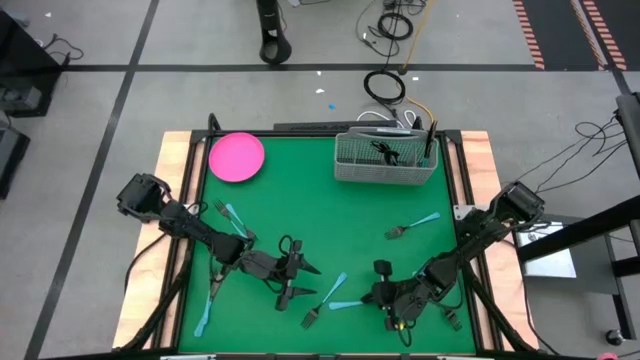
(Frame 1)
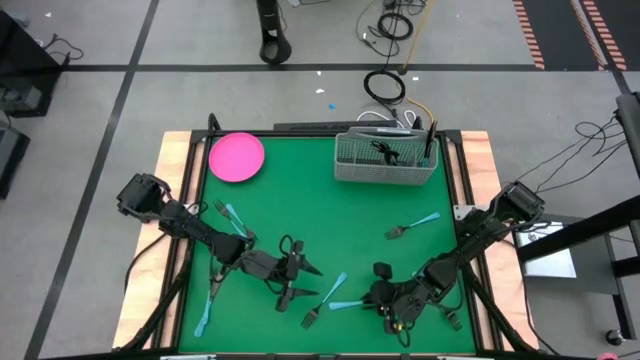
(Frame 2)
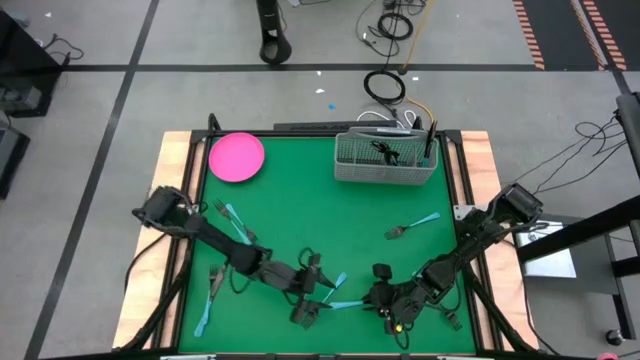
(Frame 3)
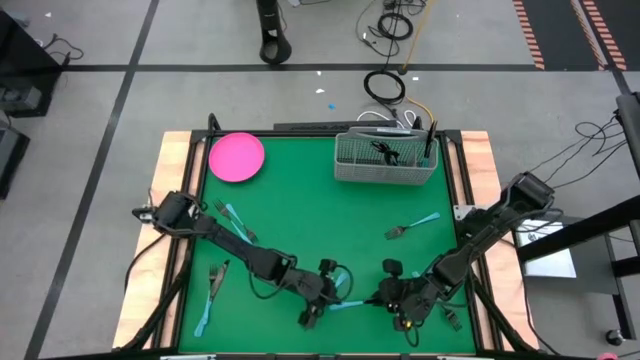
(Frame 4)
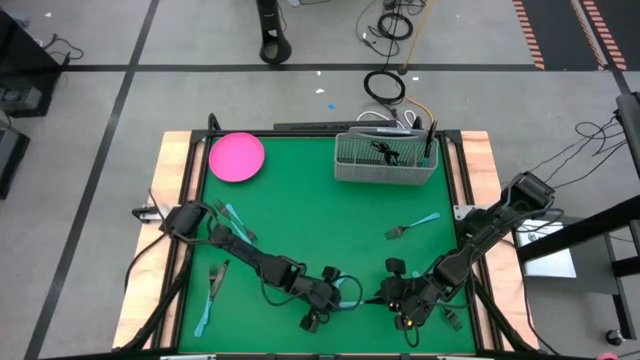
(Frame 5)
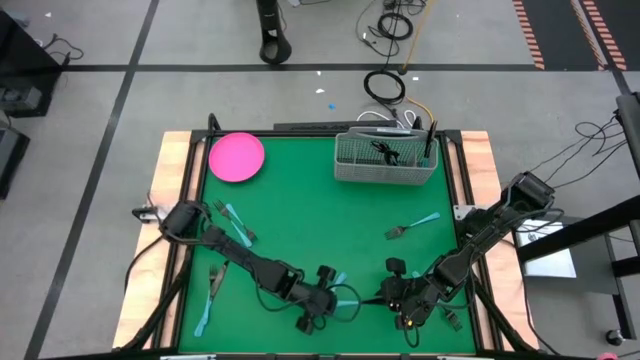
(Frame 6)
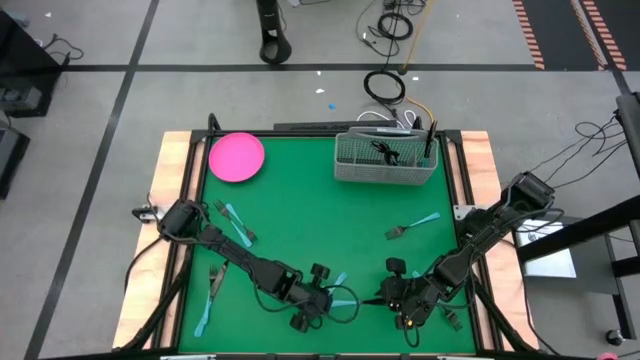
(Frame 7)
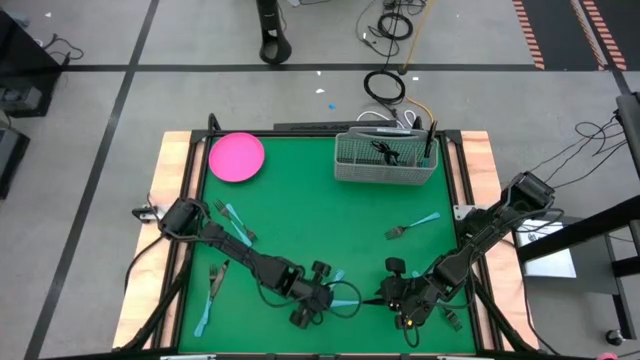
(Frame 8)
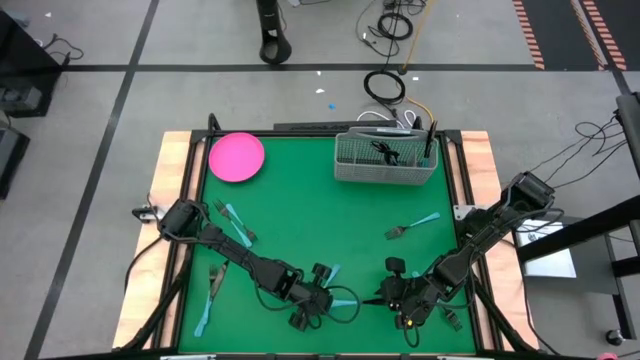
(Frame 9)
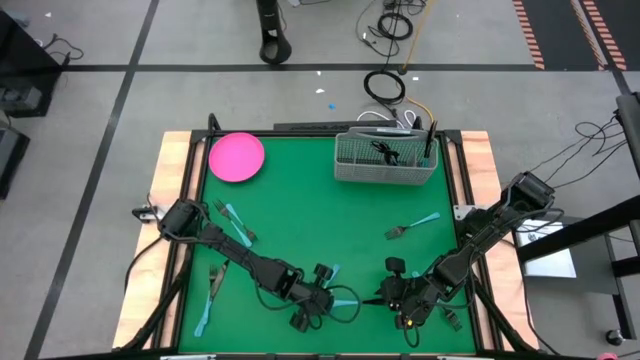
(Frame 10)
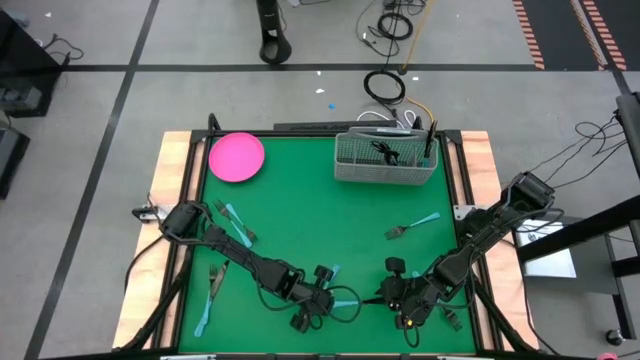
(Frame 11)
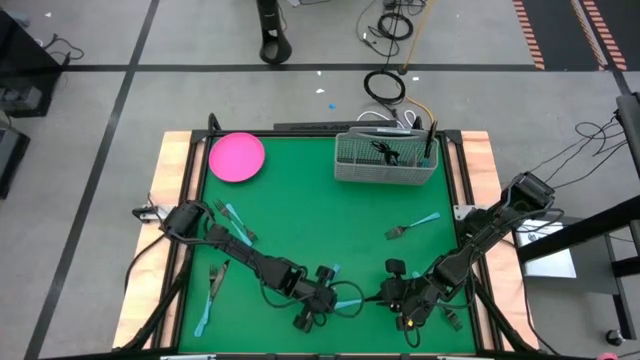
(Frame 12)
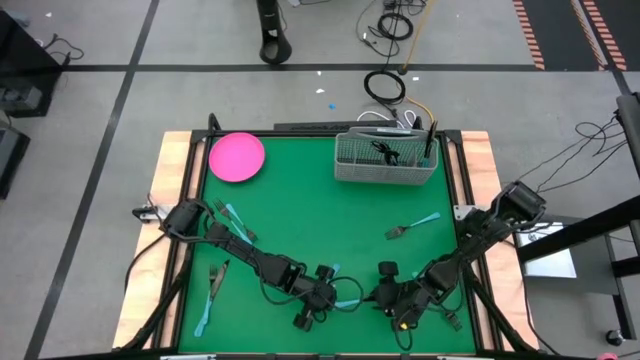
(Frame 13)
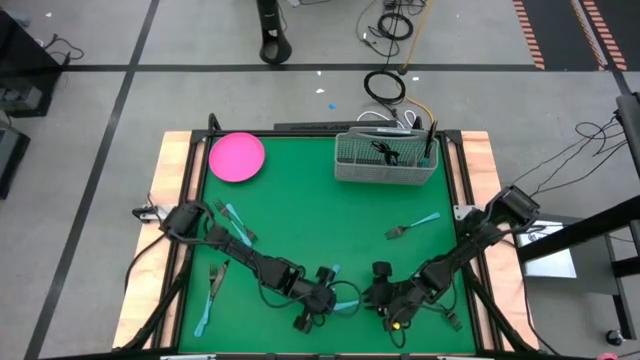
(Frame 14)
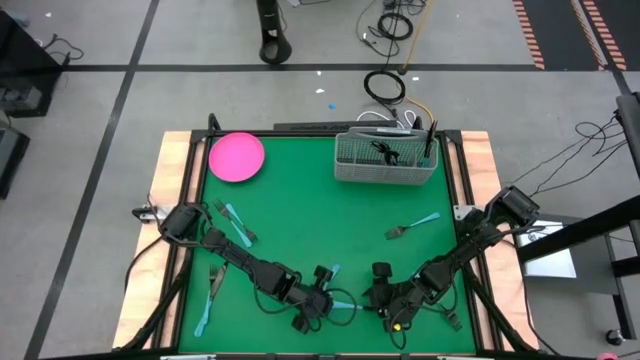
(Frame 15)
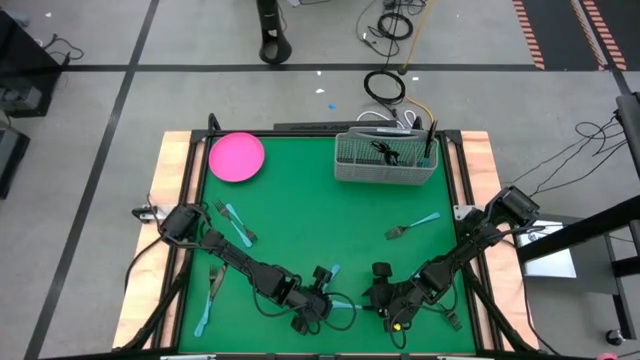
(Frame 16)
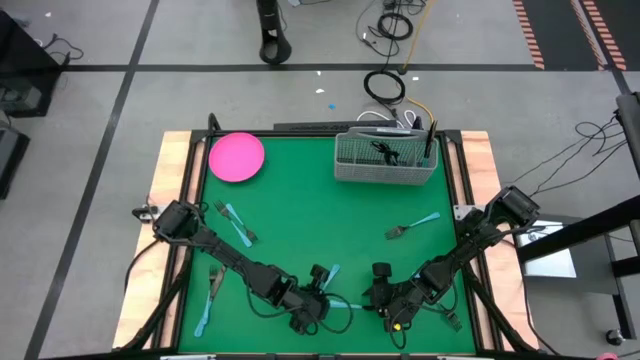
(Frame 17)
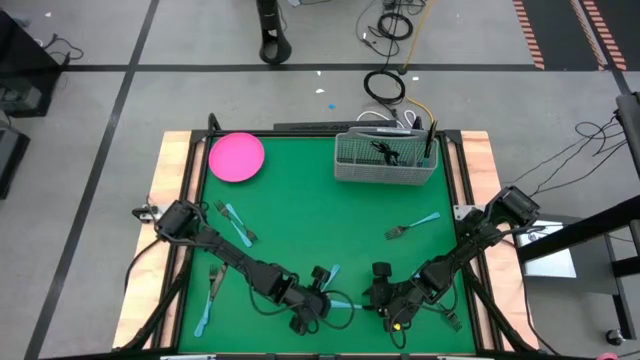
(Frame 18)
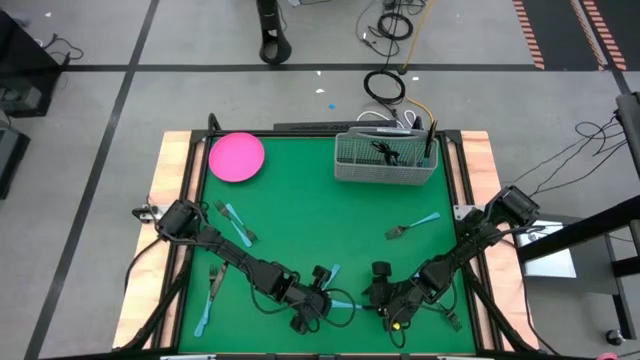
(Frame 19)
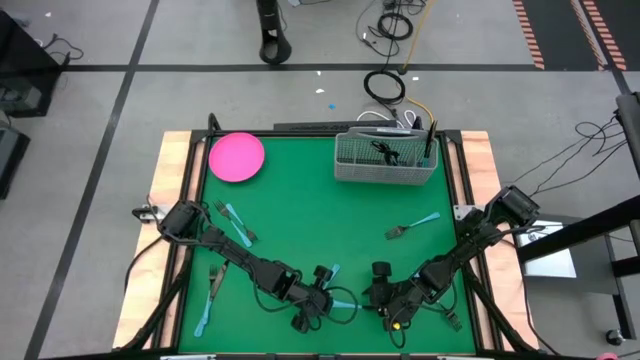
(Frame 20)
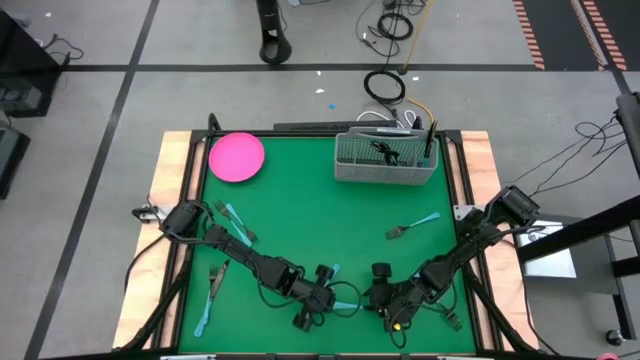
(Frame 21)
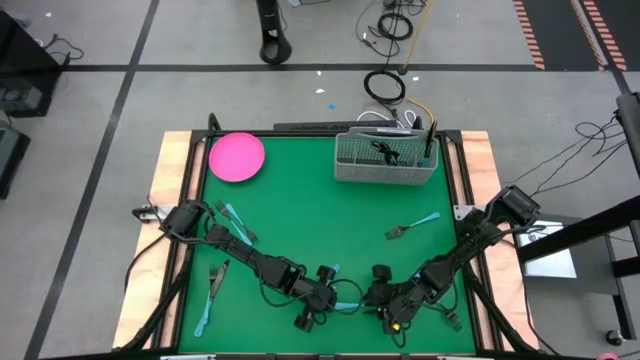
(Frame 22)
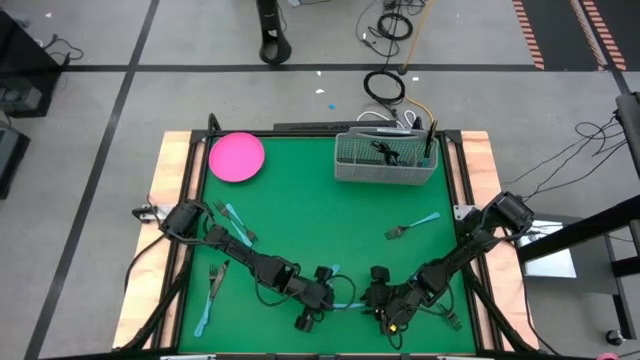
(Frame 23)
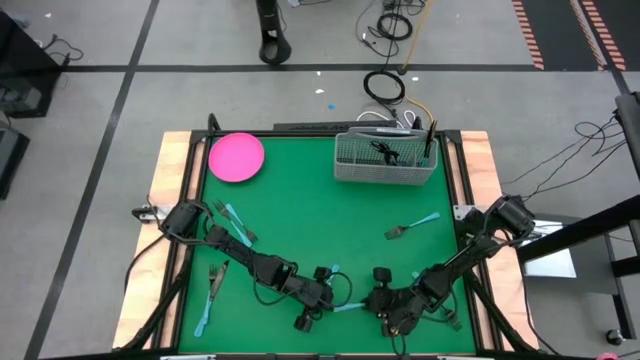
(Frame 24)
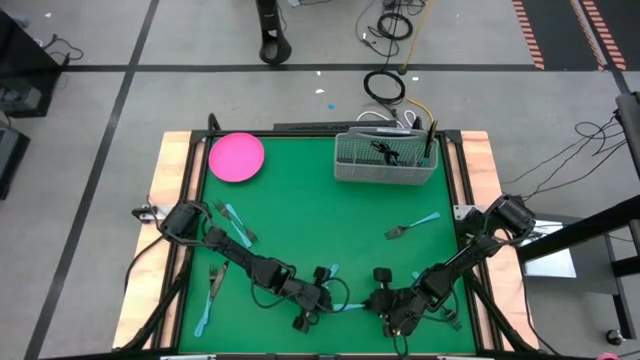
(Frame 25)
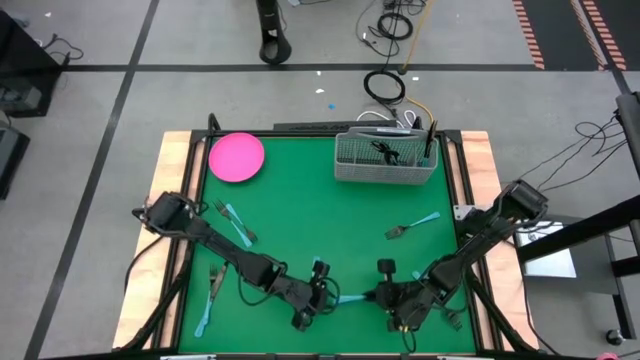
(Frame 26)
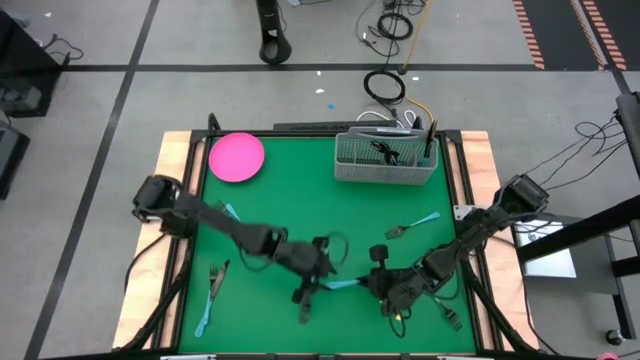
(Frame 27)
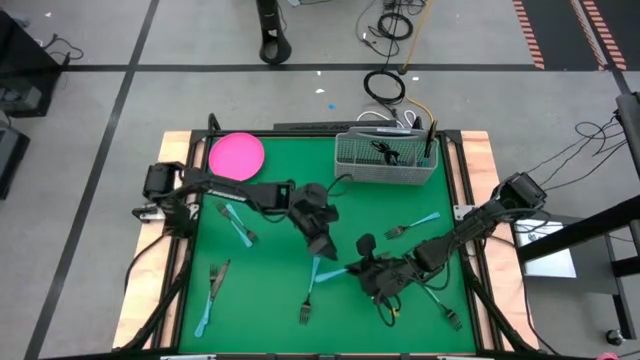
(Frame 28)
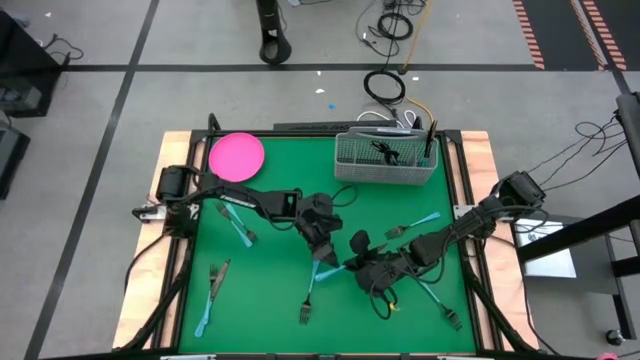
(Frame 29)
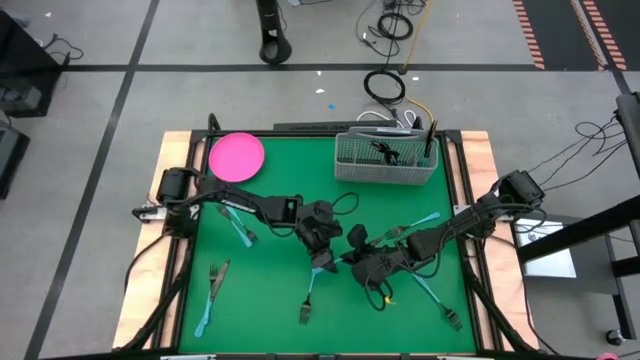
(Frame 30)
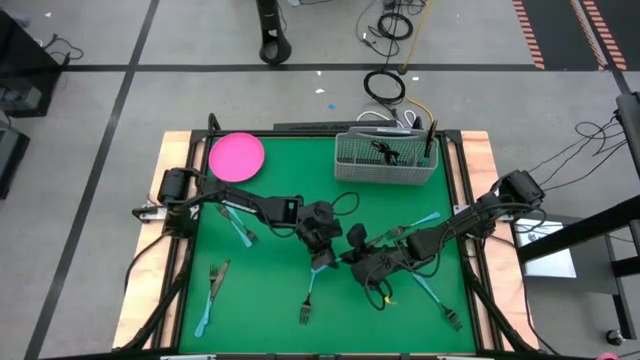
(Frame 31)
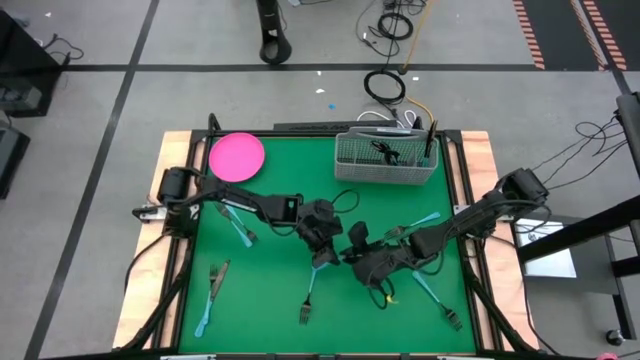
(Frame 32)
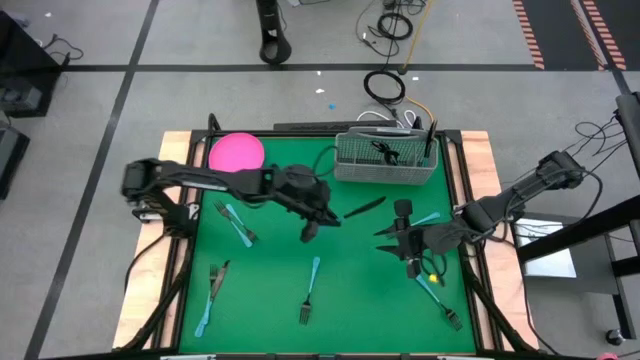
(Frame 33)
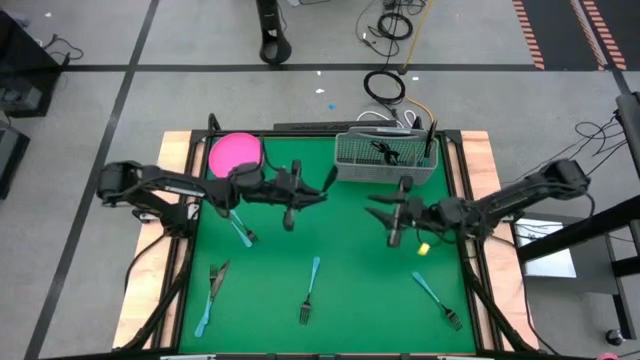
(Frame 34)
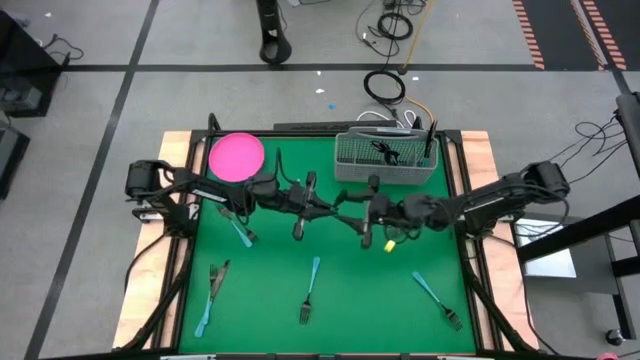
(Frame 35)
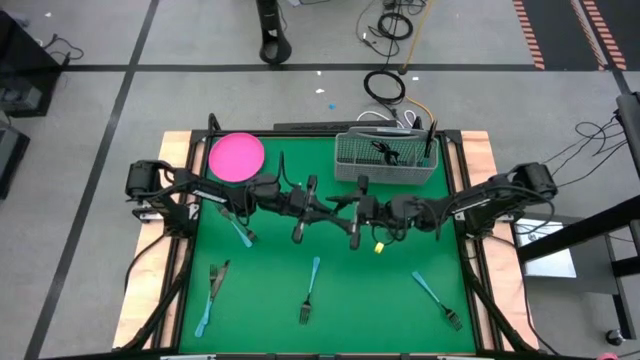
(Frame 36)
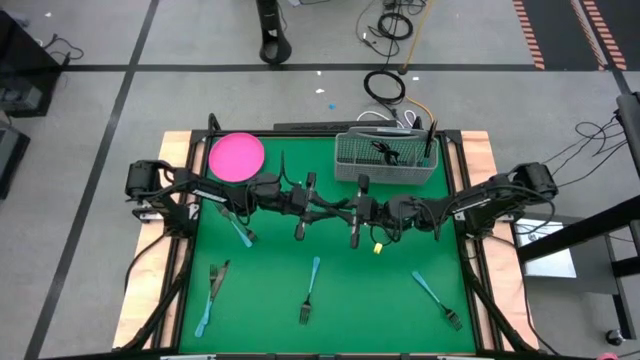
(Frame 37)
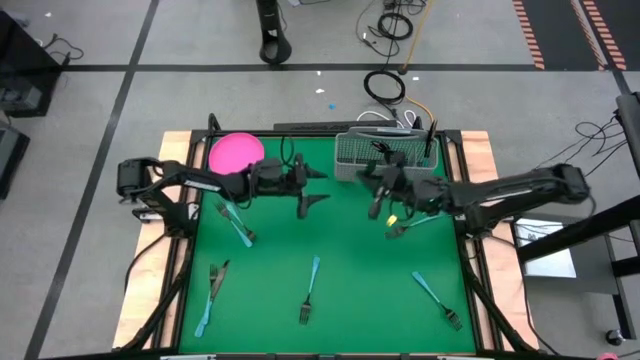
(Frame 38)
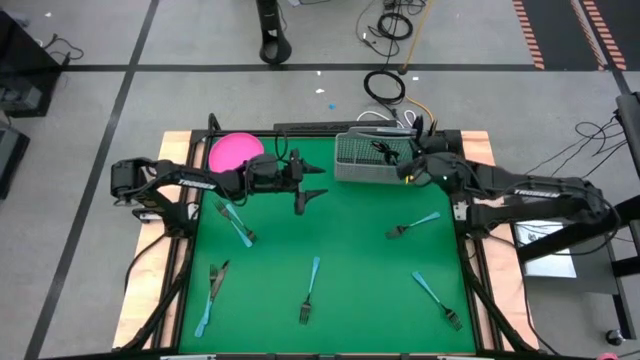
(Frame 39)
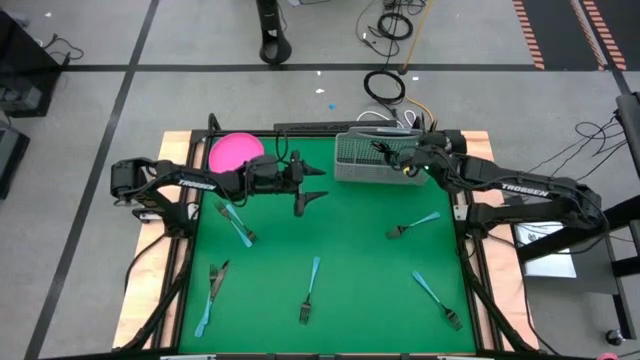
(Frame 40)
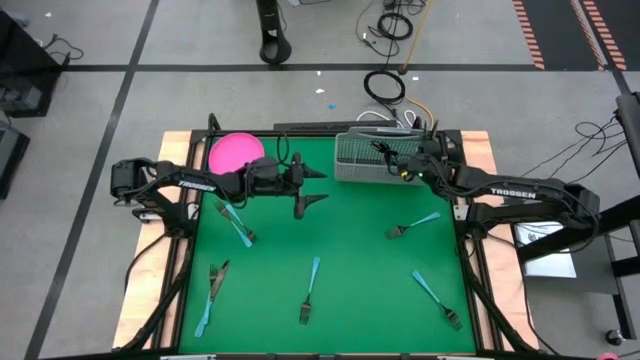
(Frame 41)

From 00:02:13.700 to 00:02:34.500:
Task: Sort silverware
Put the right black knife into the cutlery rack with the other black knives

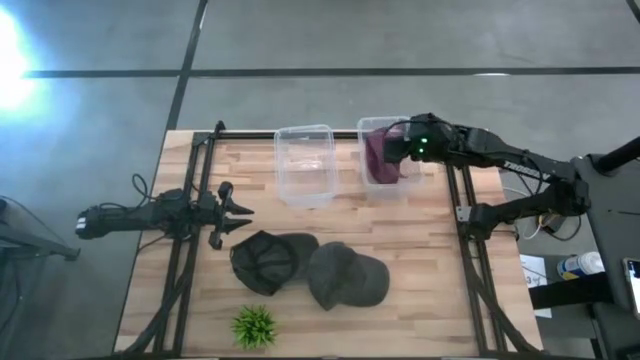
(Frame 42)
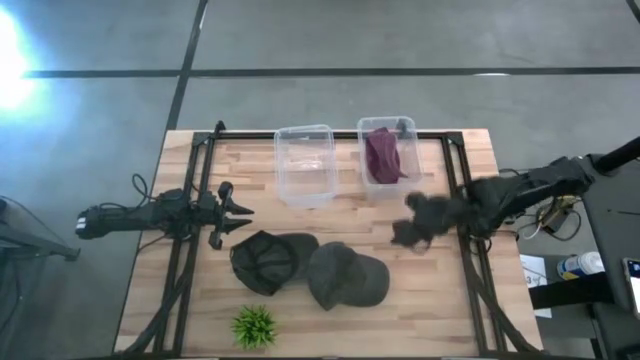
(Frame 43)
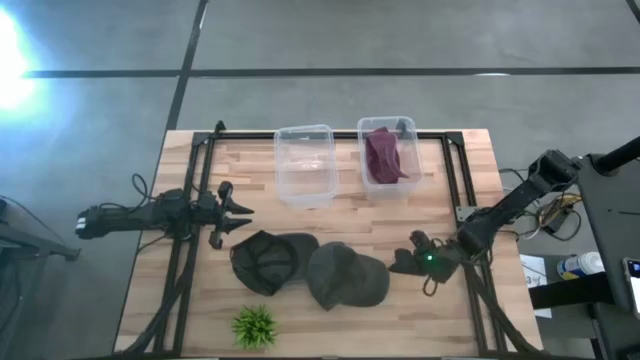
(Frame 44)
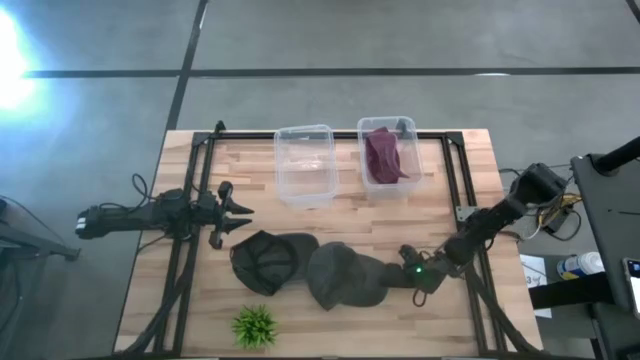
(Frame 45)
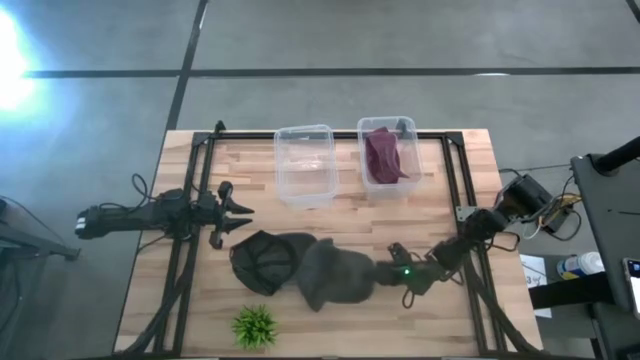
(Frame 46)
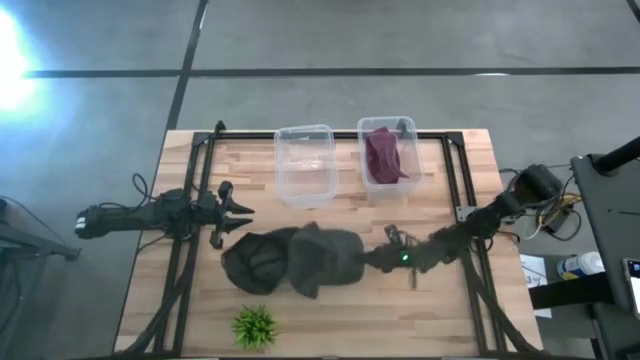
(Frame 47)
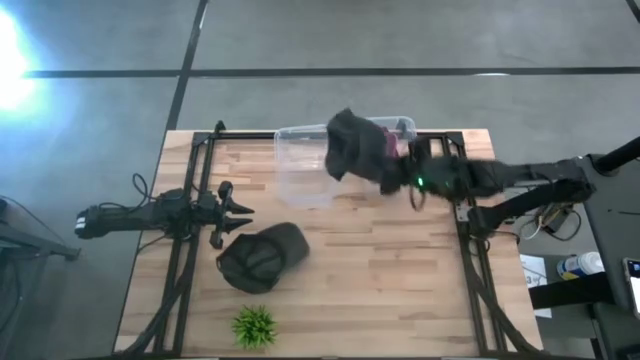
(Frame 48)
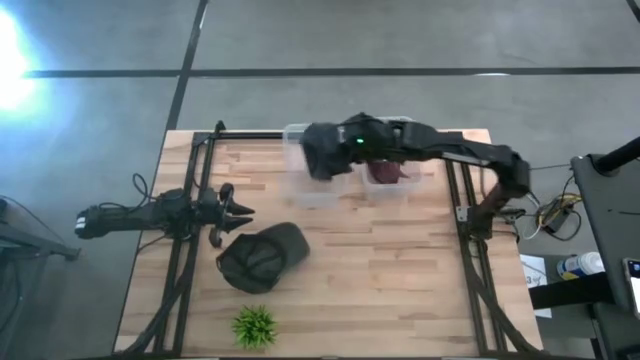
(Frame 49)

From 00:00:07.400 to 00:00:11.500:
Task: Pick & Place hat
Put the black cap into the left transparent bin
